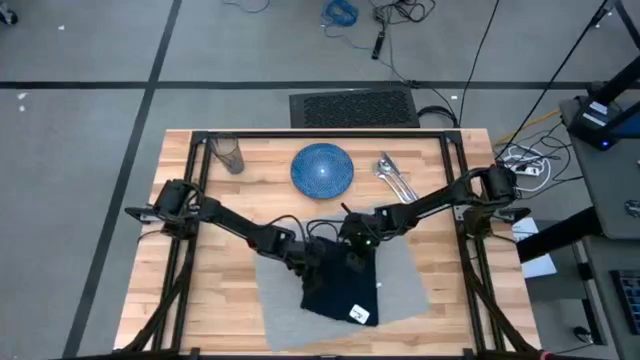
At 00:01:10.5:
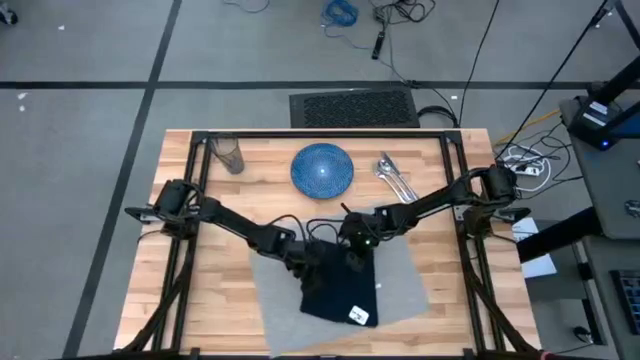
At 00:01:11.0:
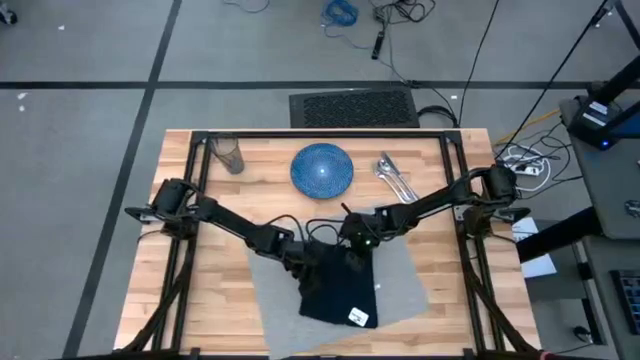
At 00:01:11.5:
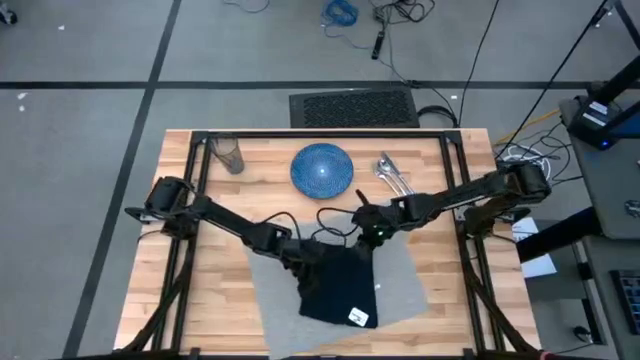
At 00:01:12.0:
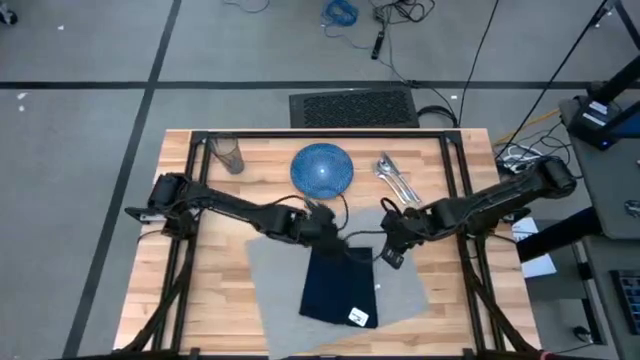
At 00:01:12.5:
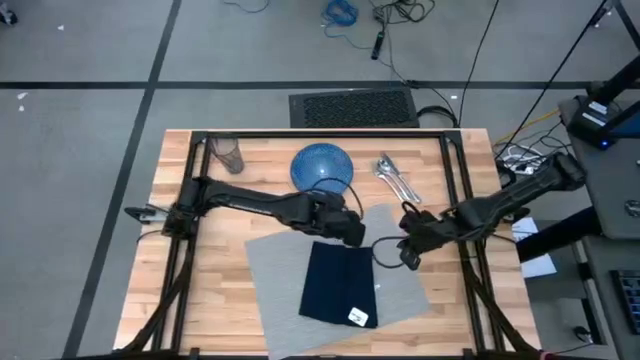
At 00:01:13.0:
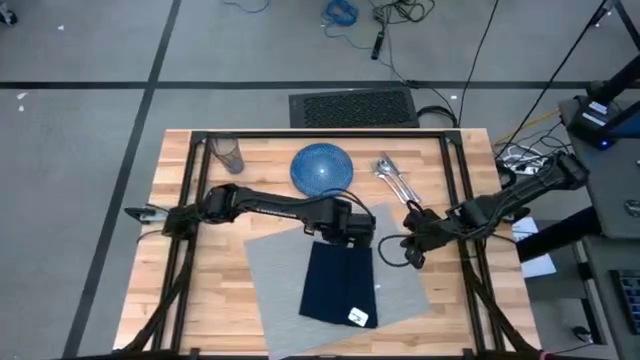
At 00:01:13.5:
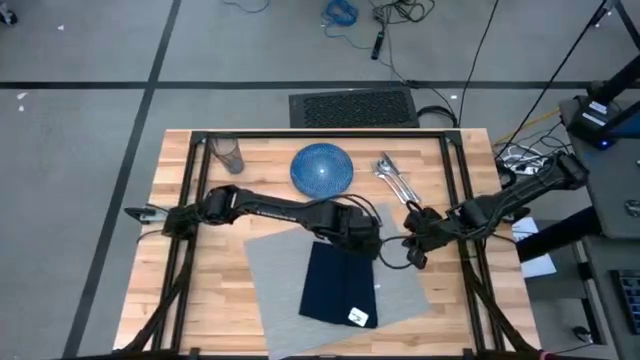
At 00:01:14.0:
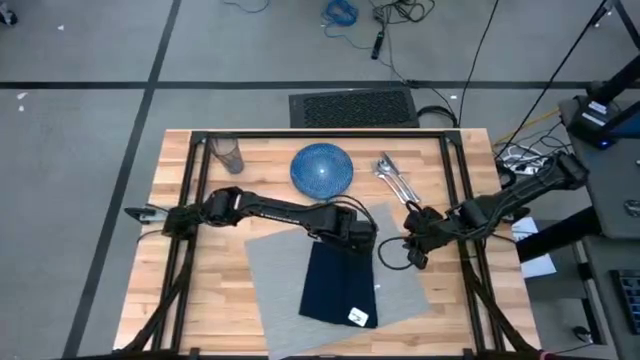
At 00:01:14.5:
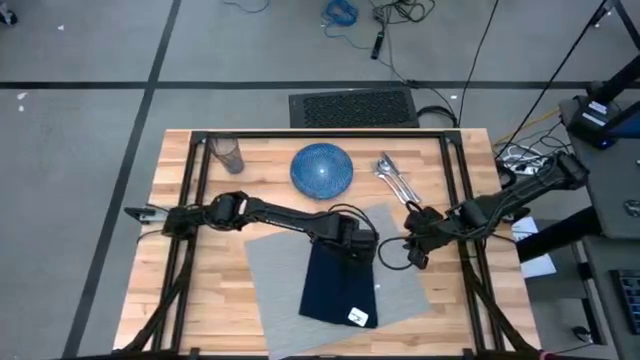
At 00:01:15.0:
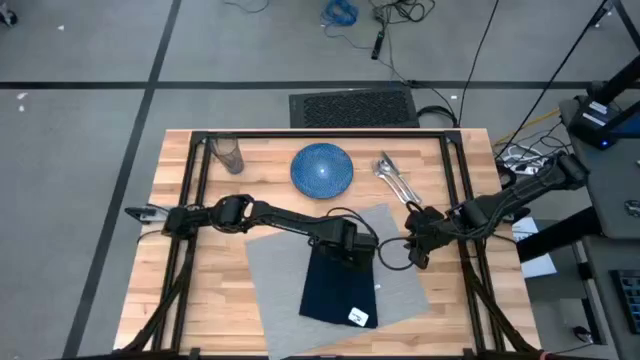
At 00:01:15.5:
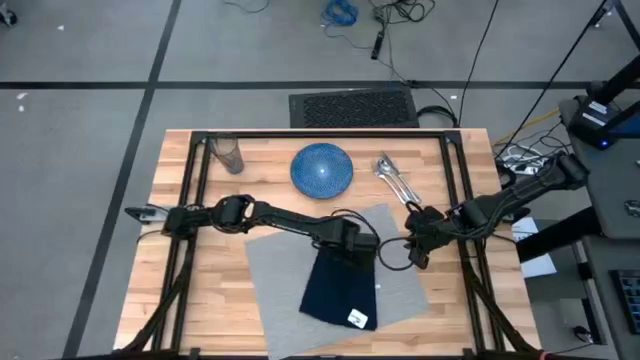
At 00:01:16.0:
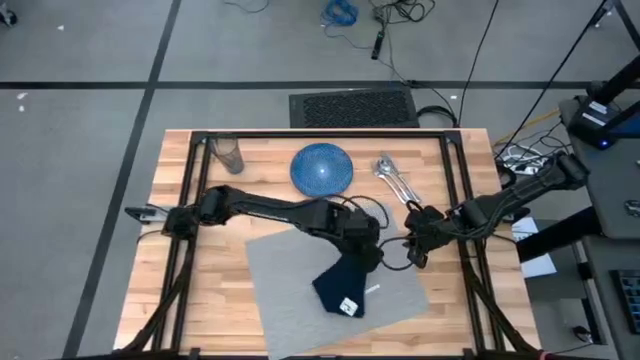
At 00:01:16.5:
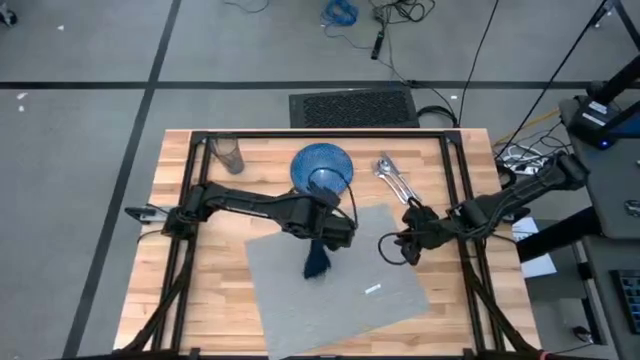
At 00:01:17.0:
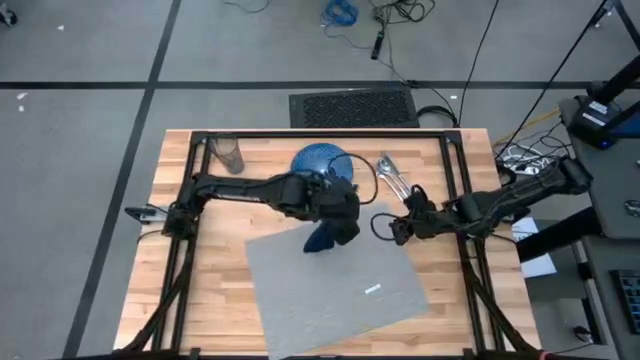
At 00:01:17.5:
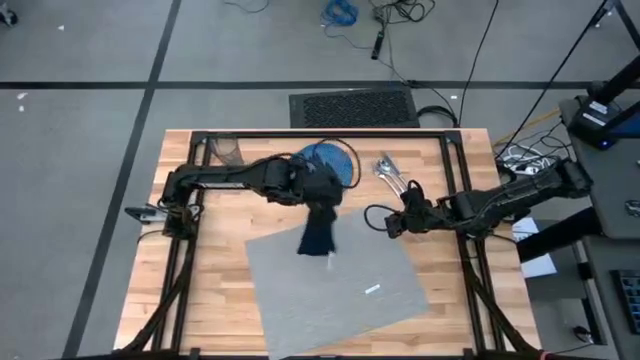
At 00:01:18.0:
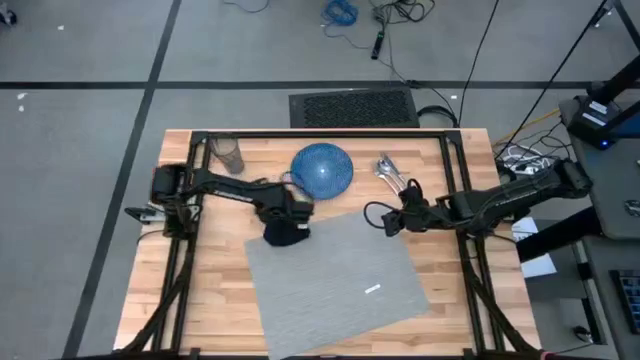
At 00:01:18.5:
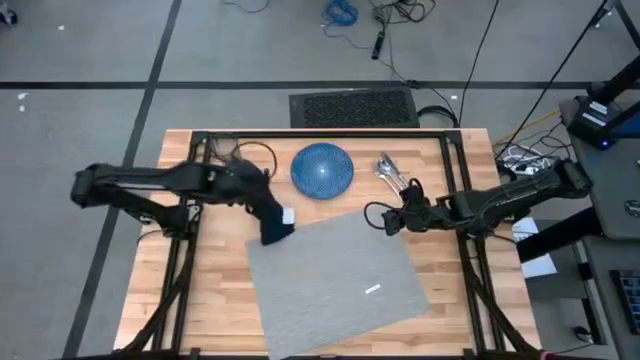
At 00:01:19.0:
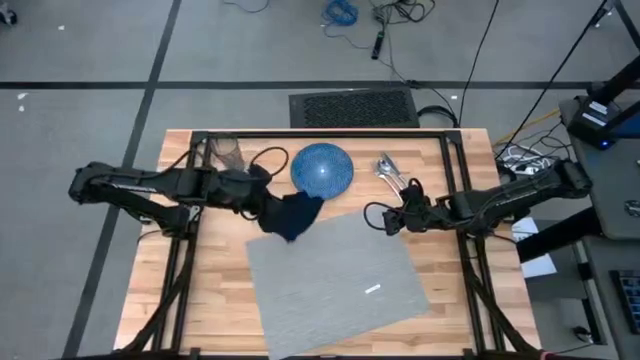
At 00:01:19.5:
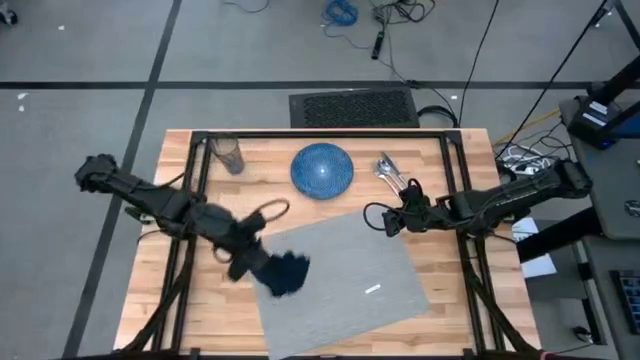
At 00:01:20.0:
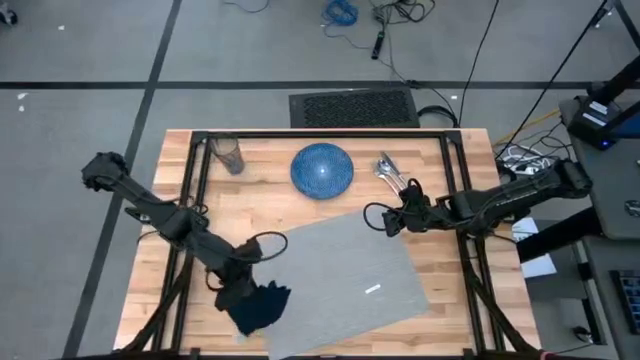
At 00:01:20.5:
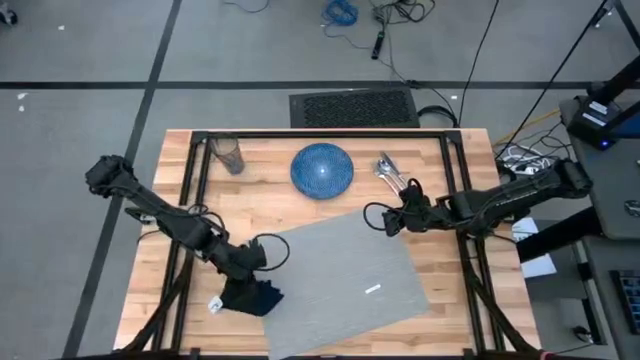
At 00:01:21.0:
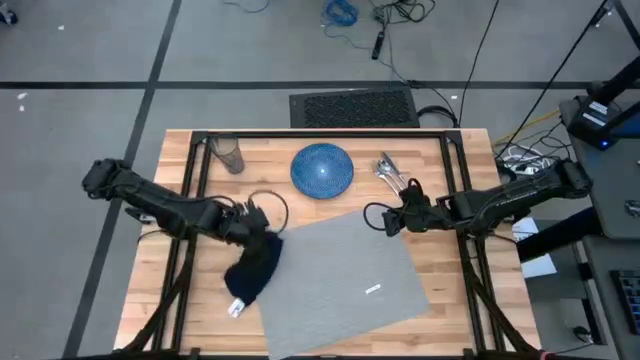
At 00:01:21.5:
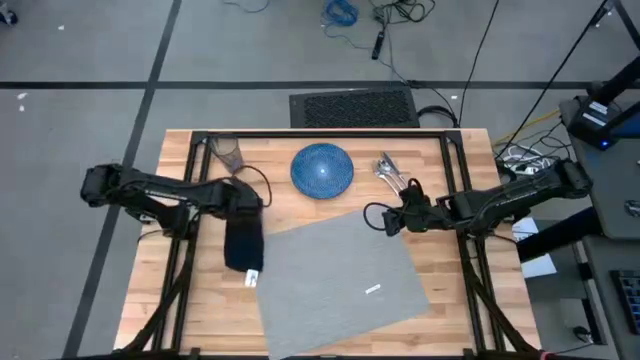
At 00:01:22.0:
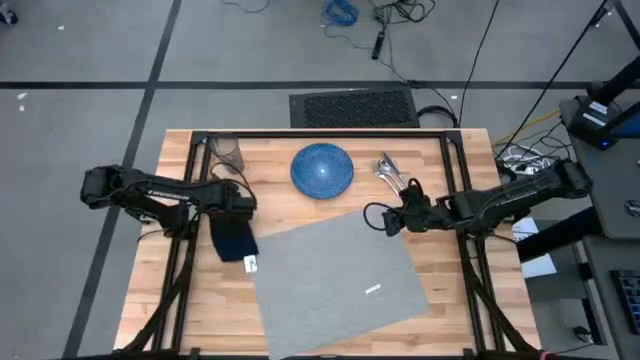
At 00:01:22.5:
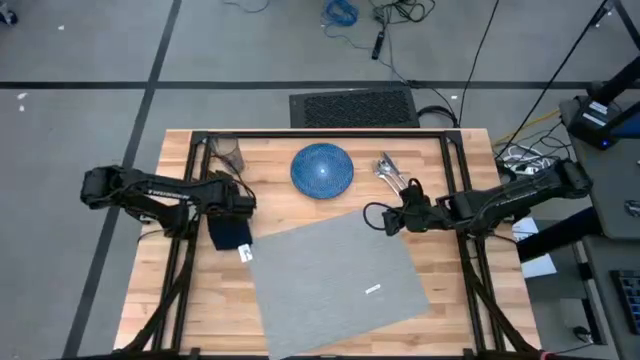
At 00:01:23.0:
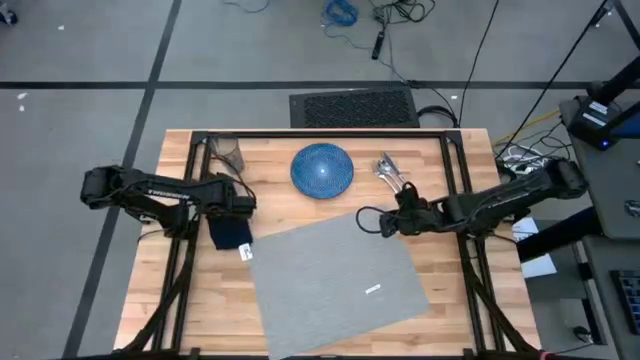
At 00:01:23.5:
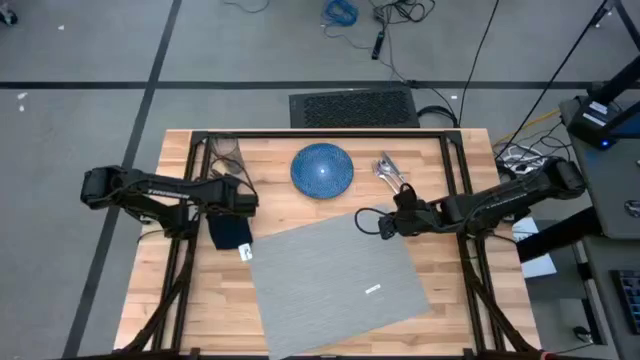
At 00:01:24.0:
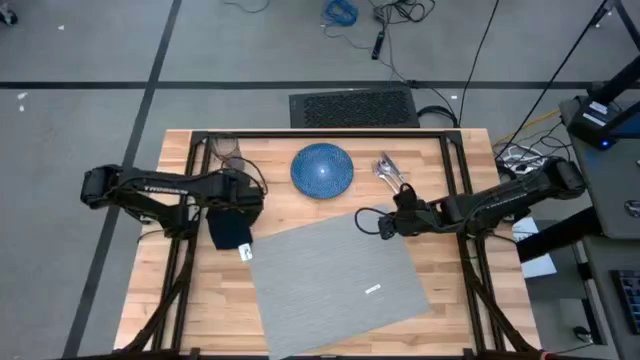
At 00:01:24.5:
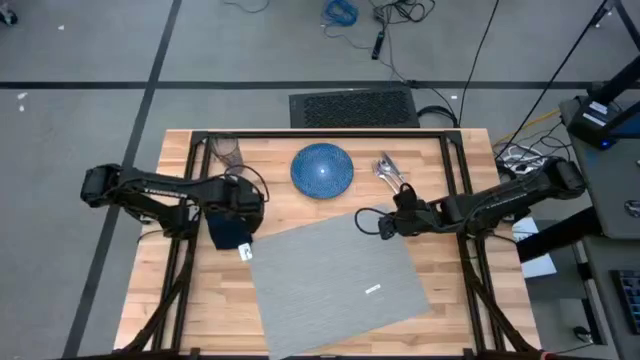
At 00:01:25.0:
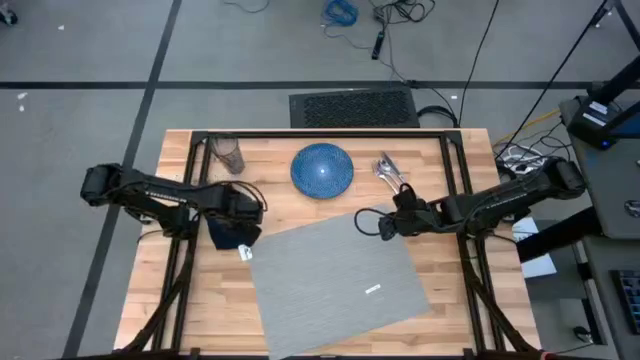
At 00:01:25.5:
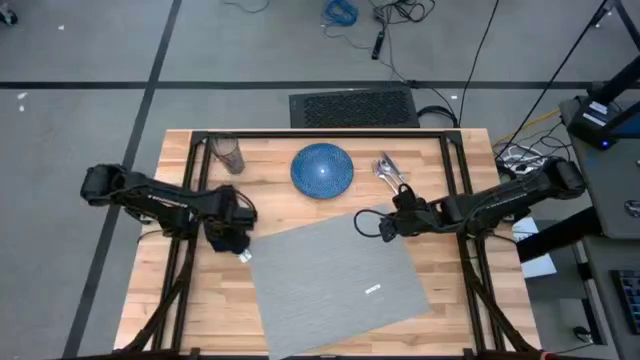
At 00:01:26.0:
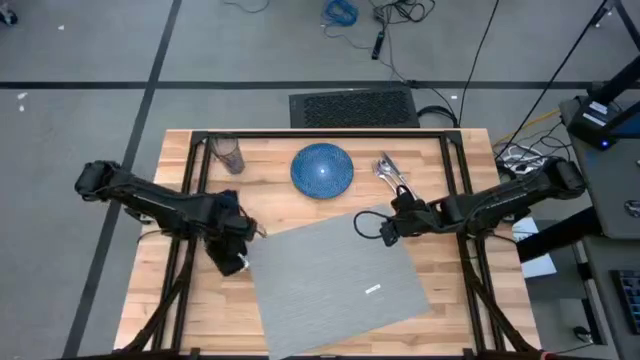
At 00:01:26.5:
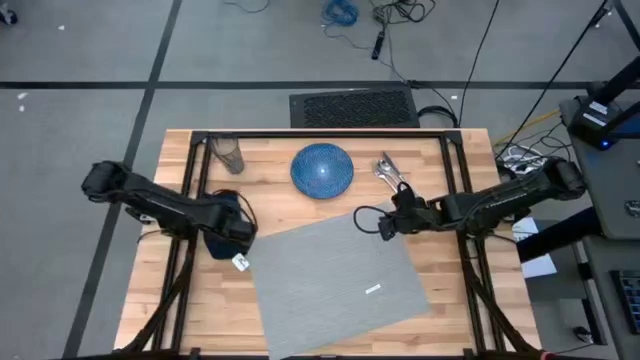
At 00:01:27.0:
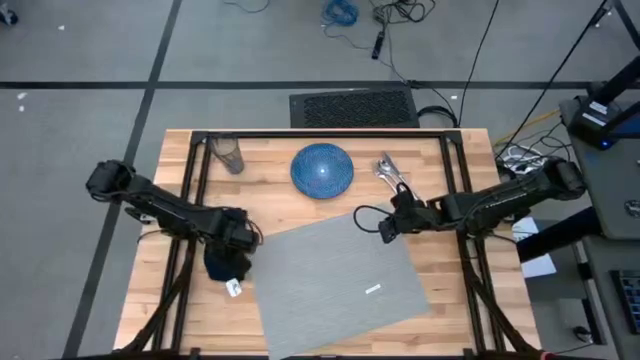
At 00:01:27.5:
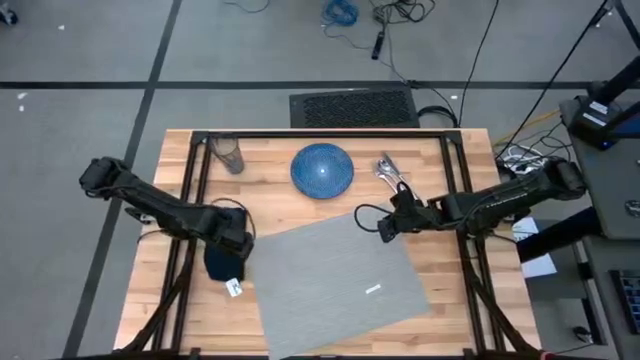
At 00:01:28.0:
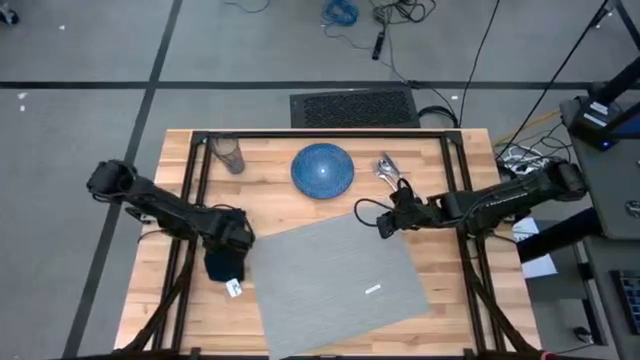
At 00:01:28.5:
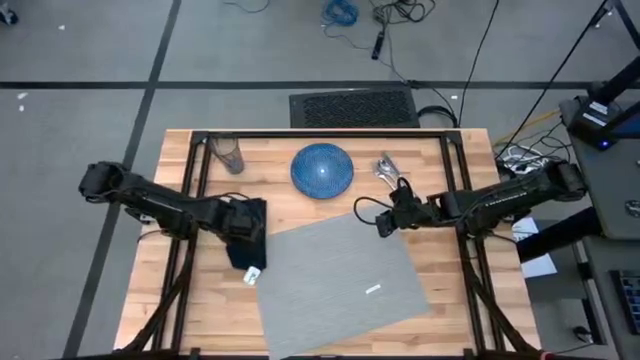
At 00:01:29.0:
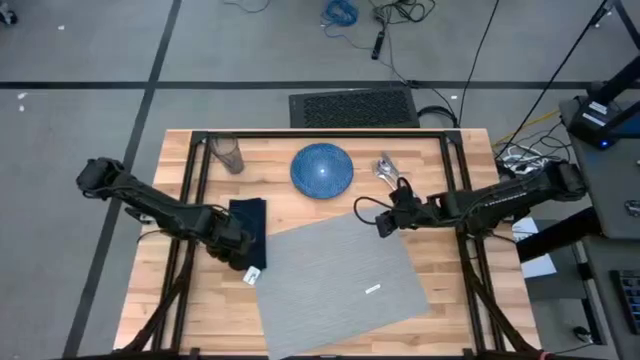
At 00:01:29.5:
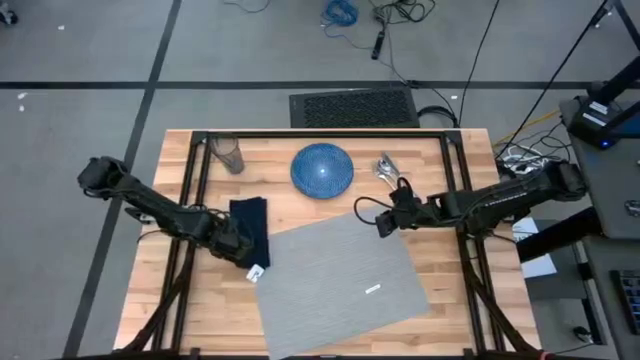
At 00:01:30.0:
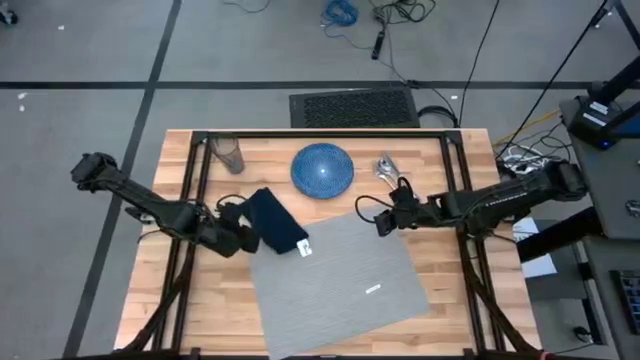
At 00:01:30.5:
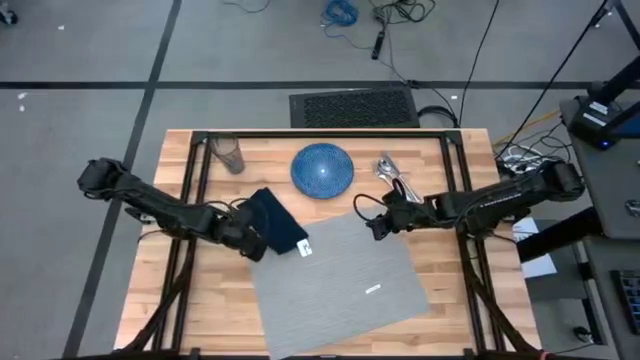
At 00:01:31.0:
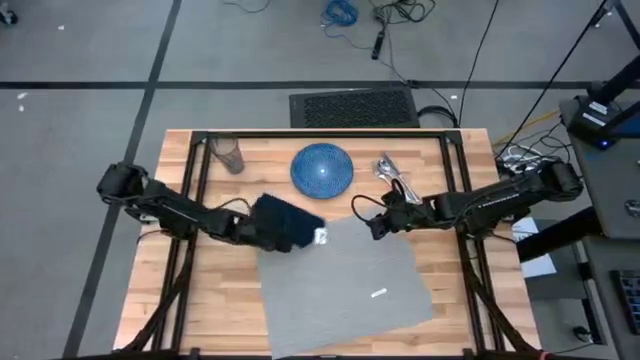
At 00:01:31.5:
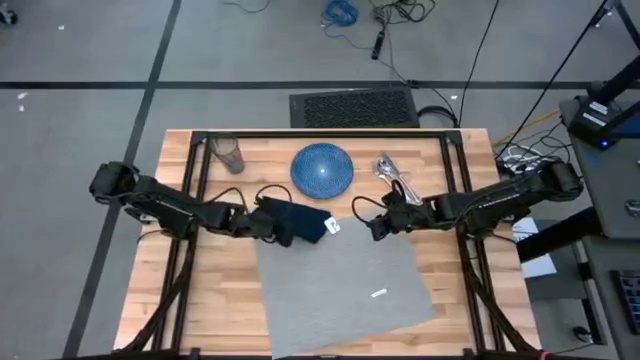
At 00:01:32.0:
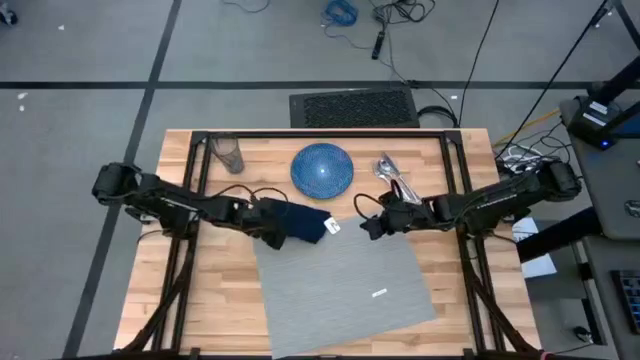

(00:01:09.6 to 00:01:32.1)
Task: Set table place
Fold the blue table napkin
